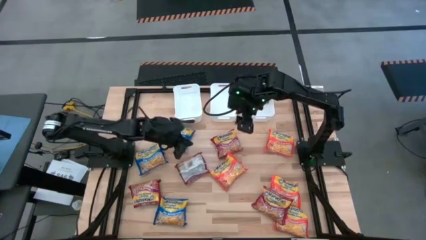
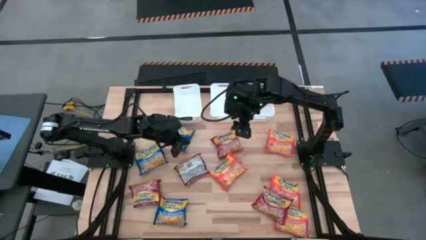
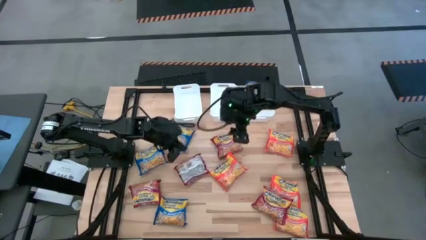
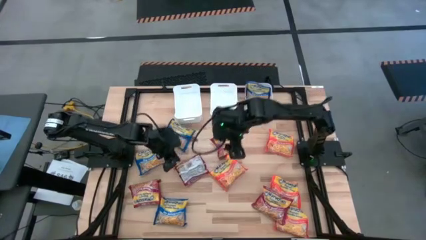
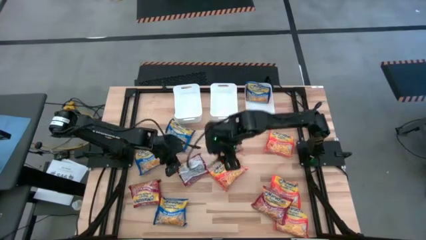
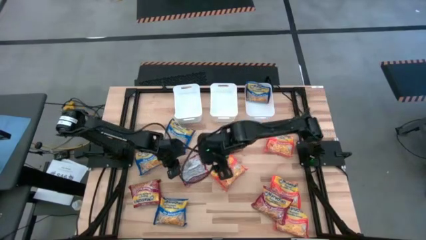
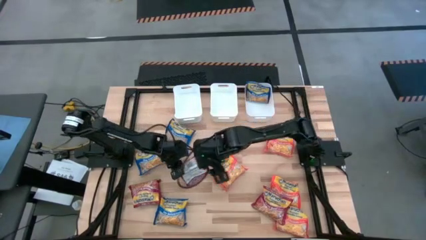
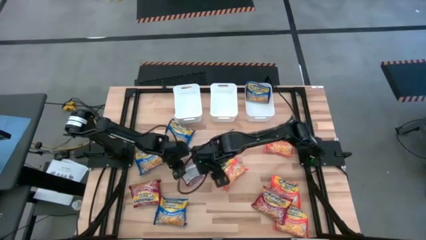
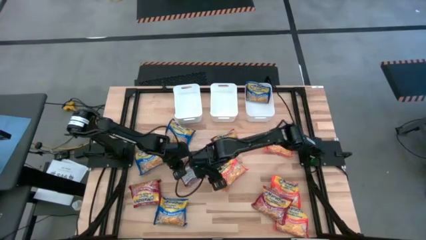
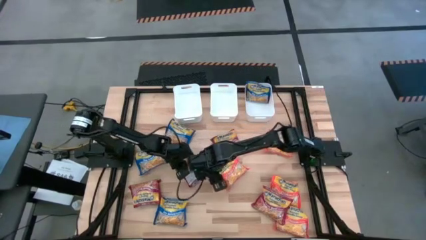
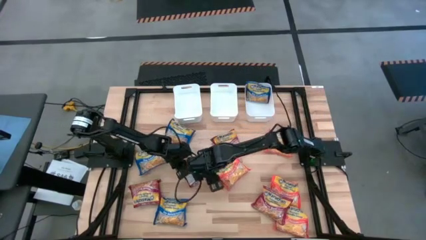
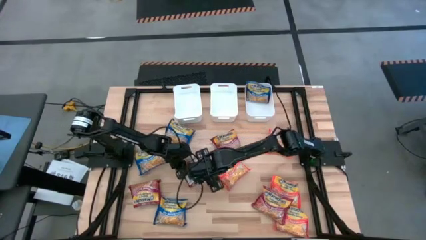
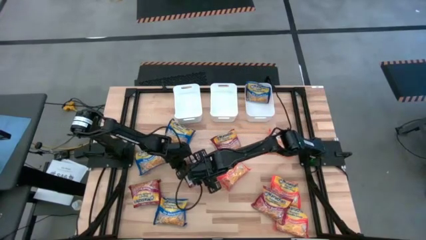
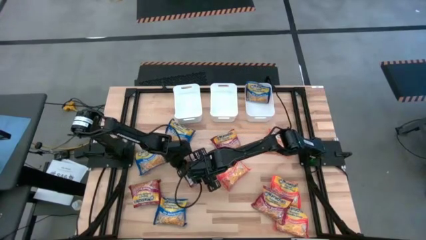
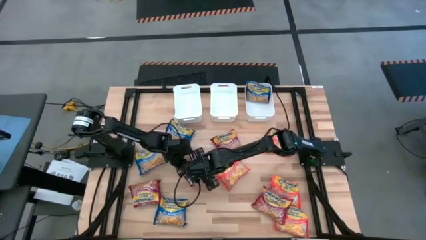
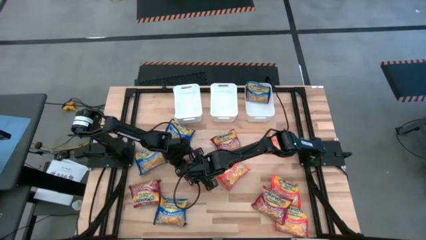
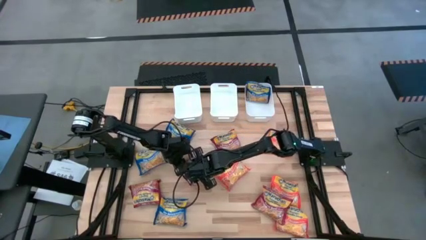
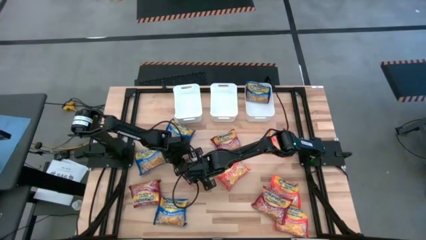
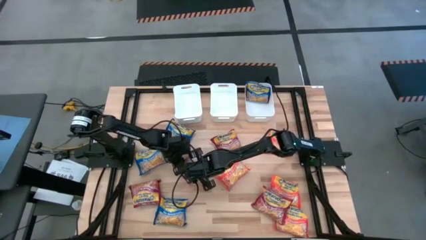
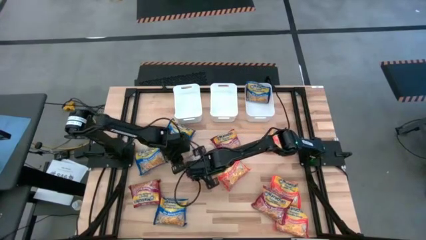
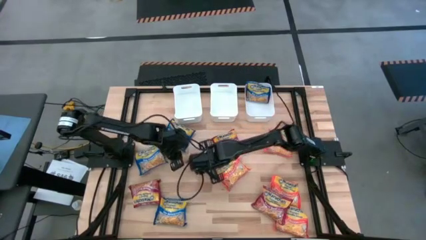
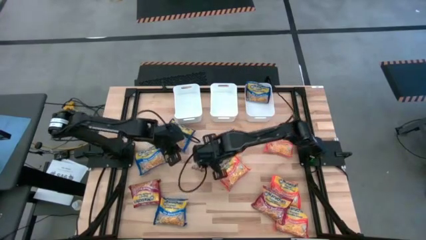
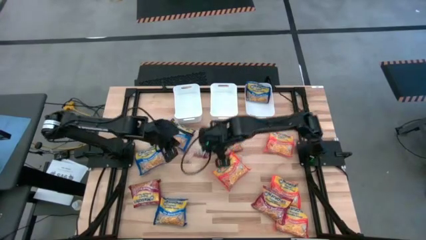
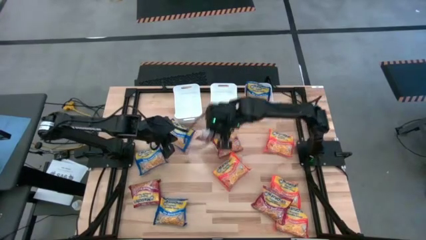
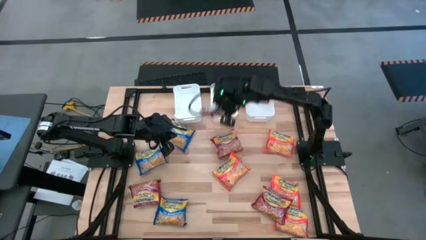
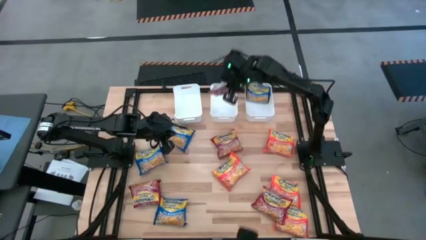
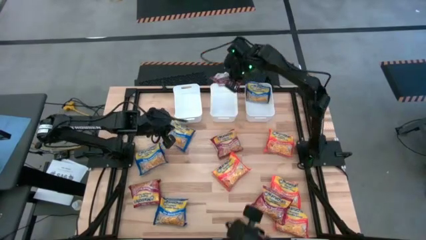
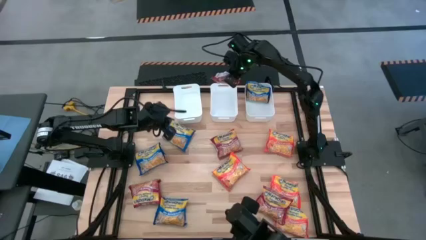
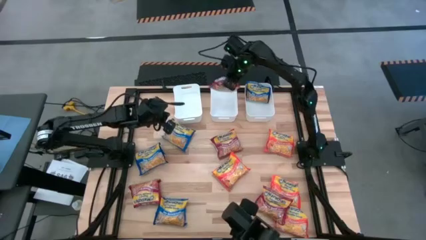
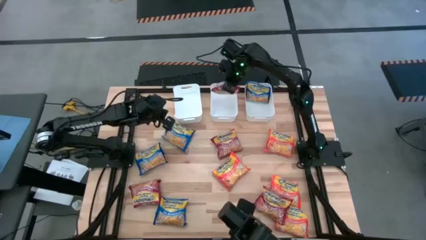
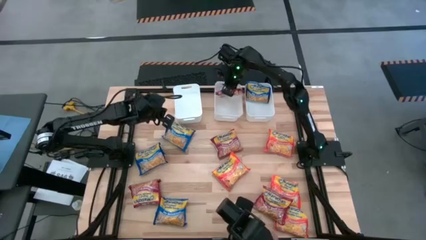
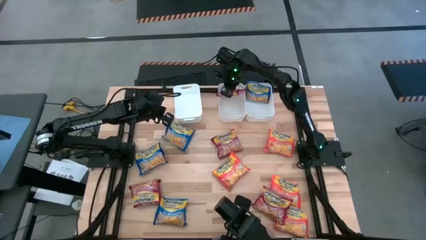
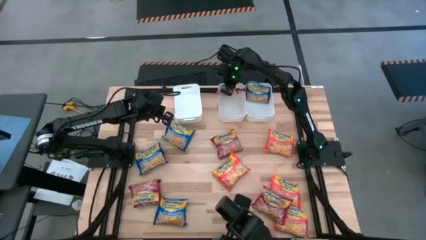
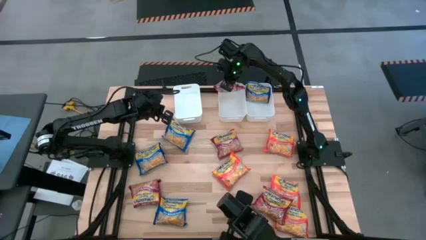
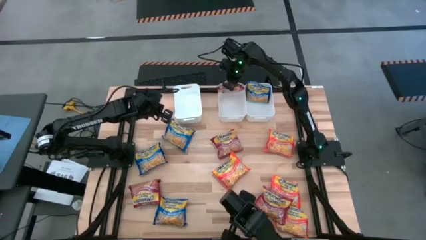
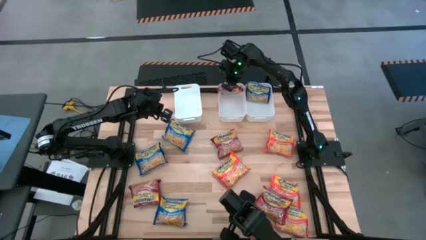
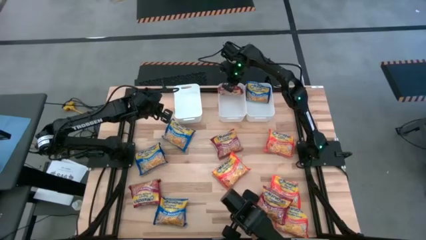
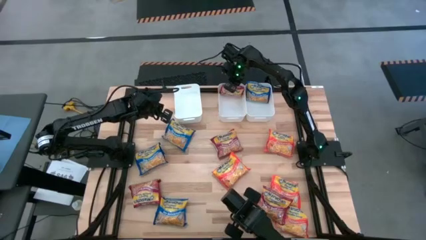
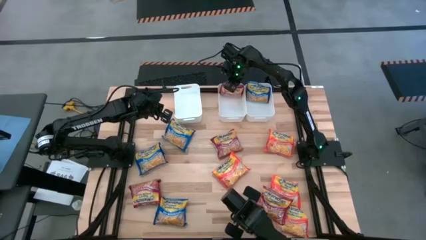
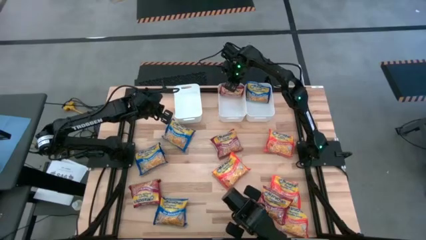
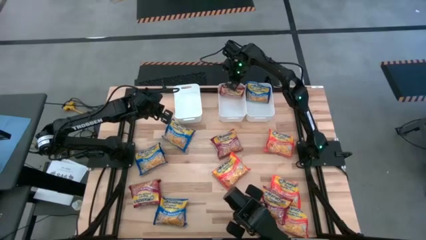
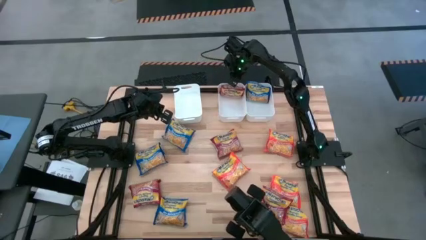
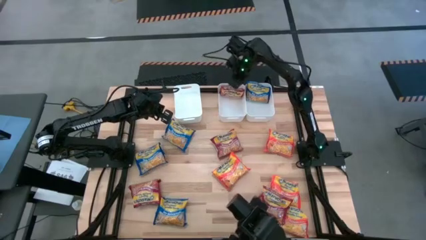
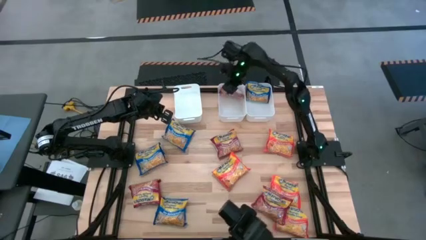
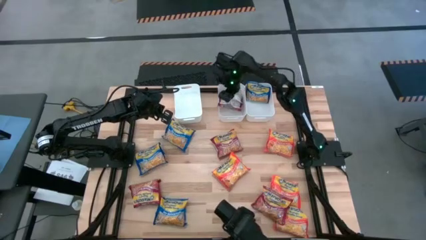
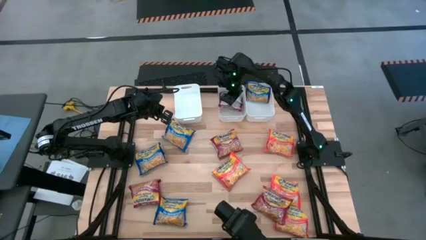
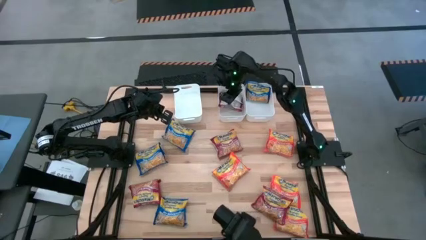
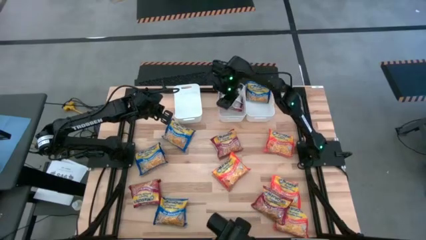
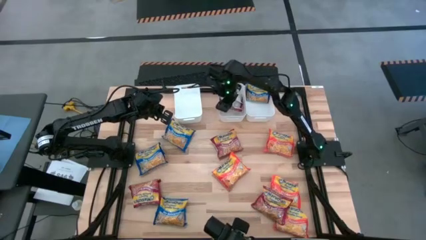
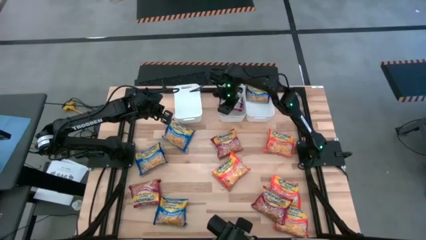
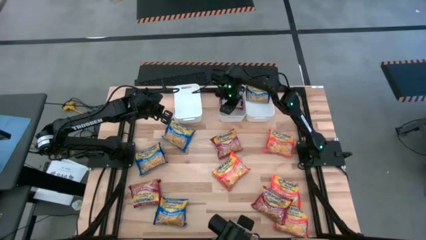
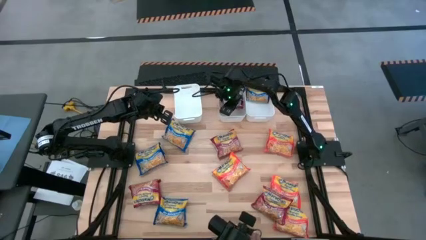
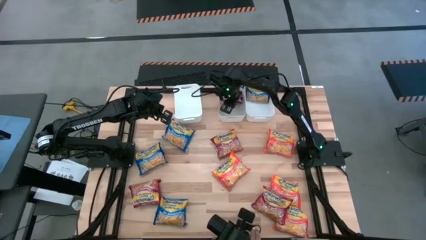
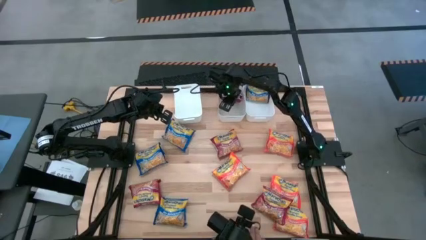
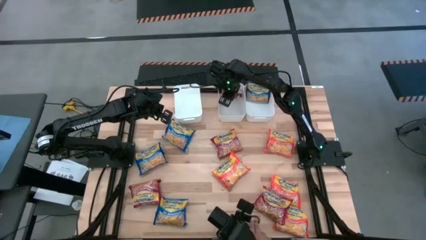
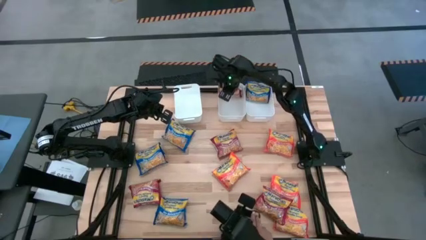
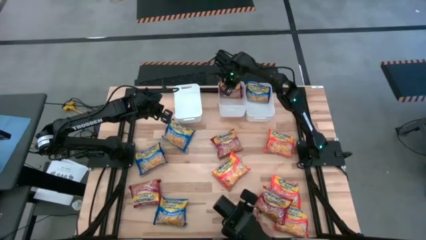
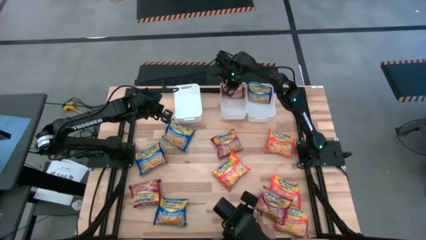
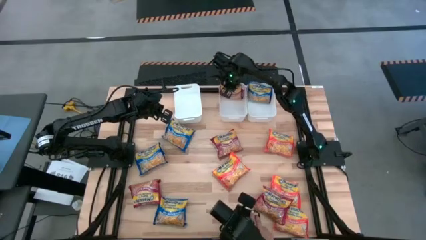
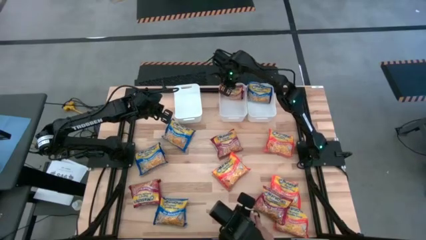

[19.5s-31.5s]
Task: Sort Maruchan noodles
Put the red noodle pack into the middle white bin

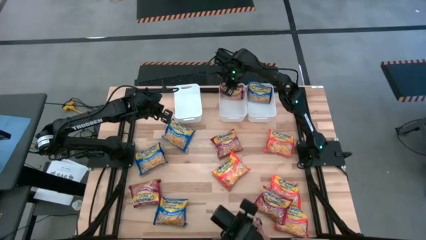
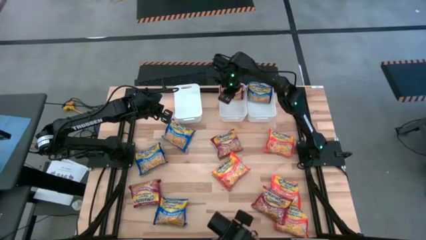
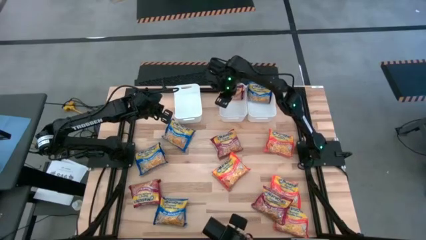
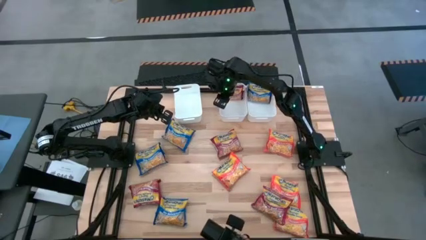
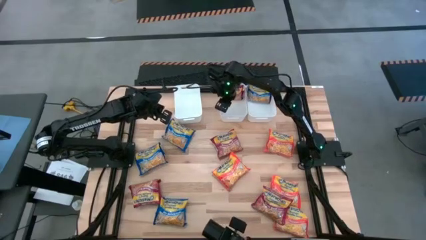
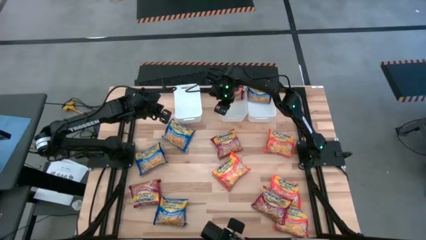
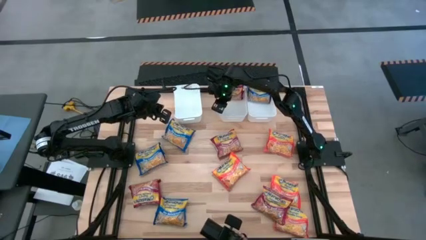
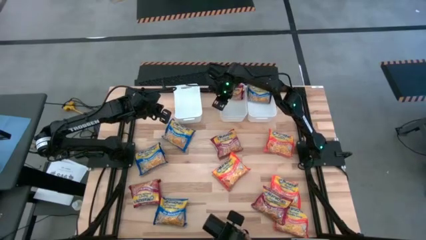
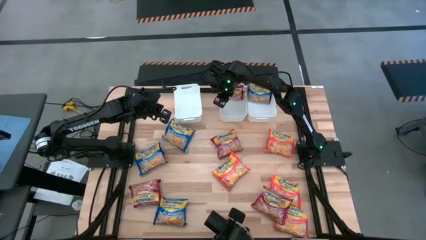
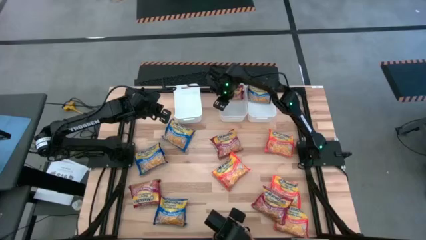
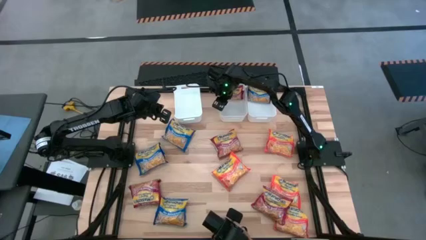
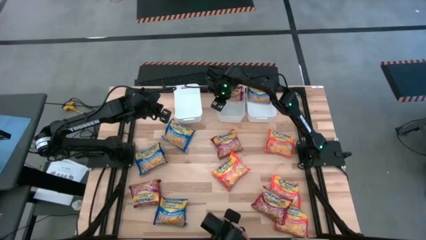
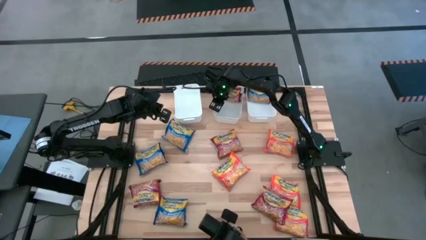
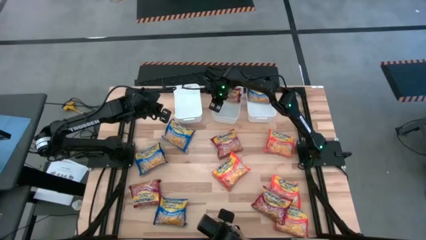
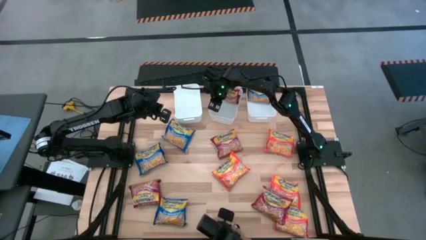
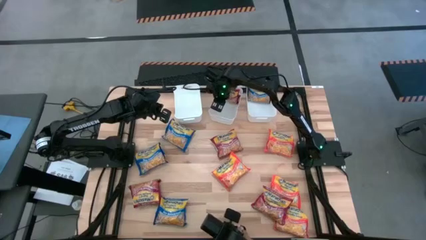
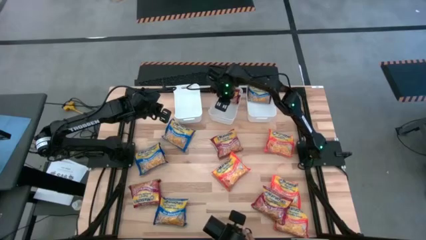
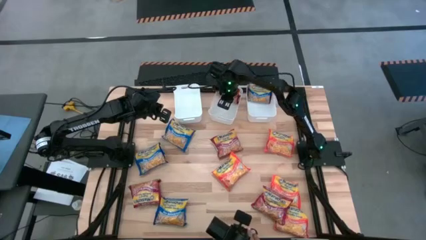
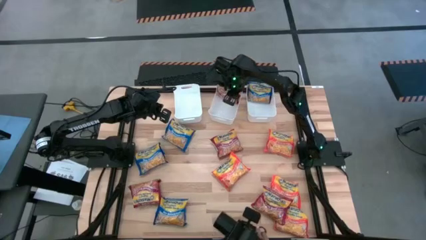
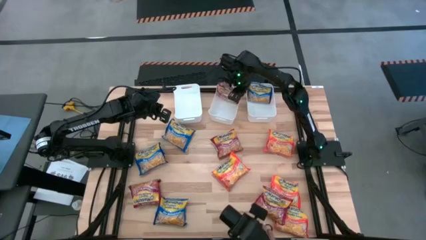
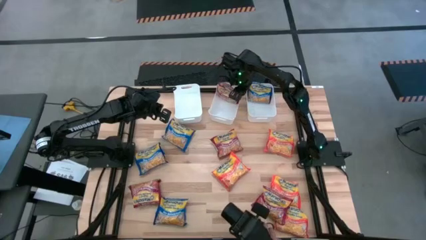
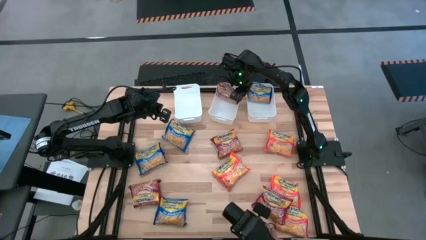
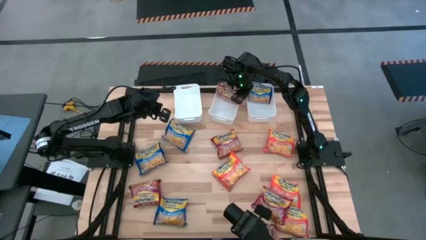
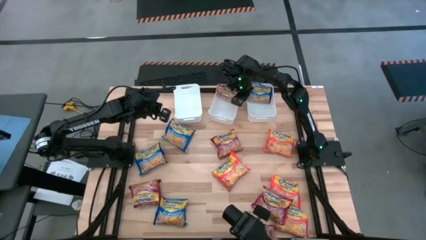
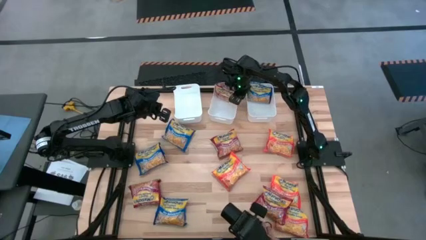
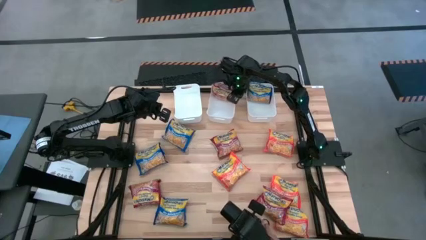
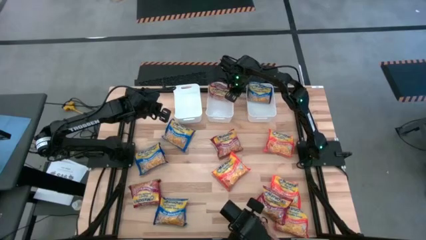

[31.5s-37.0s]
Adjust the middle white bin
